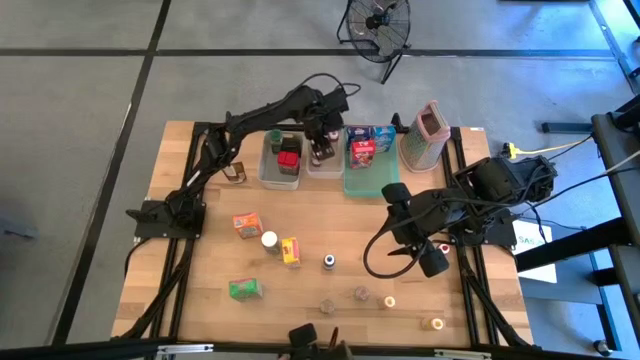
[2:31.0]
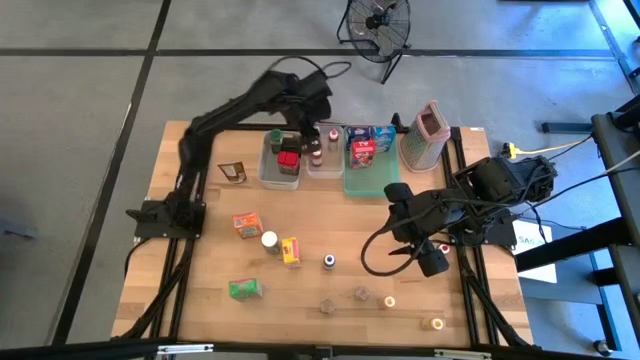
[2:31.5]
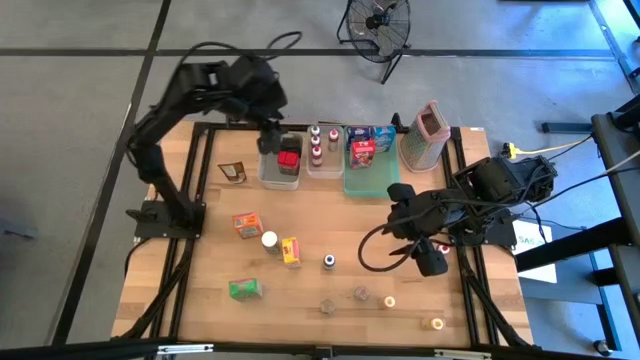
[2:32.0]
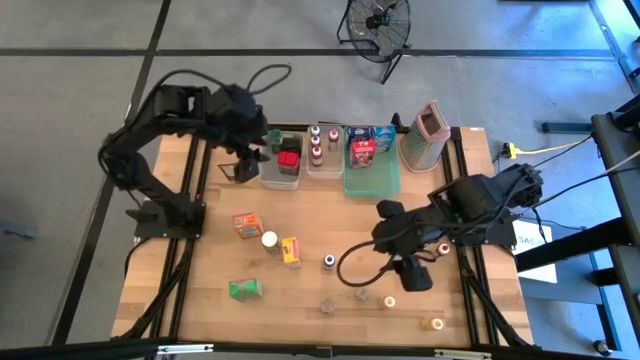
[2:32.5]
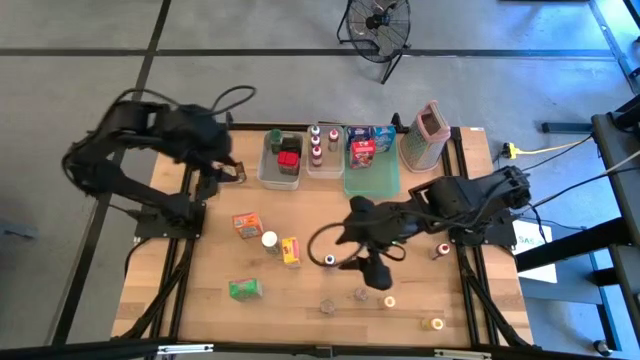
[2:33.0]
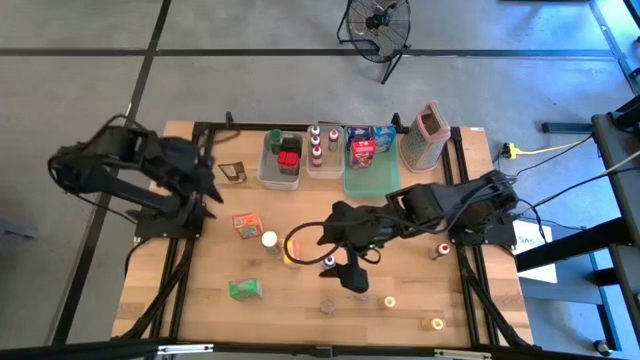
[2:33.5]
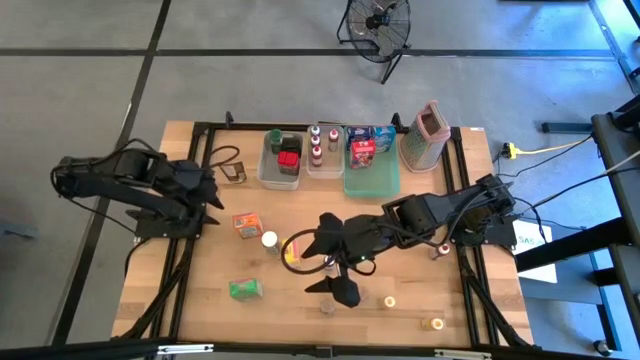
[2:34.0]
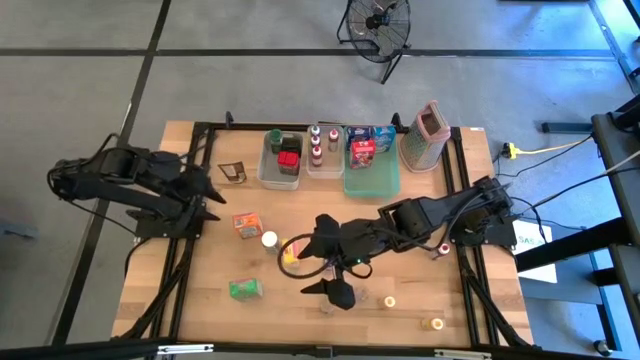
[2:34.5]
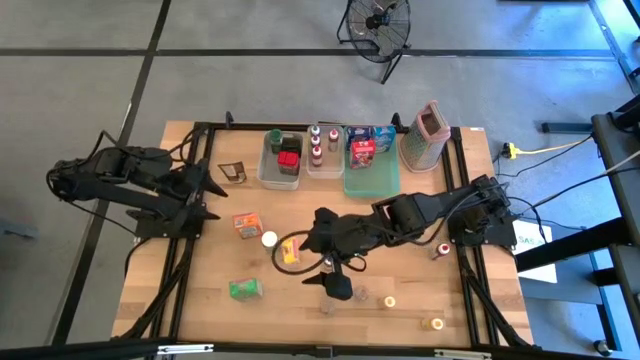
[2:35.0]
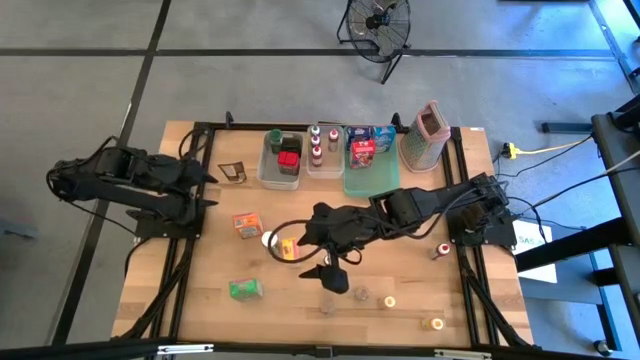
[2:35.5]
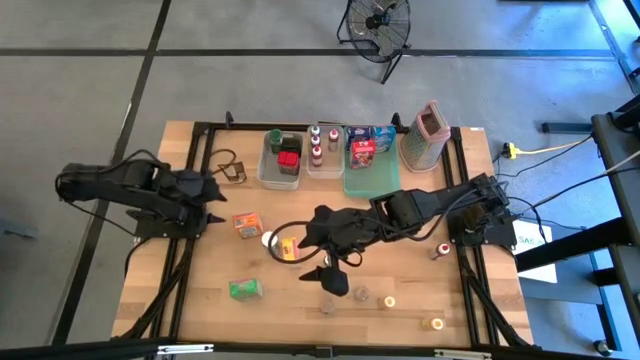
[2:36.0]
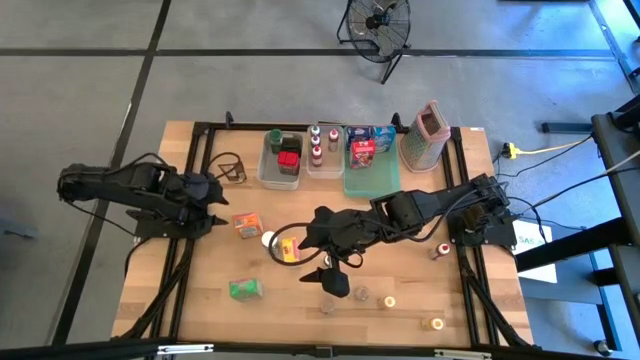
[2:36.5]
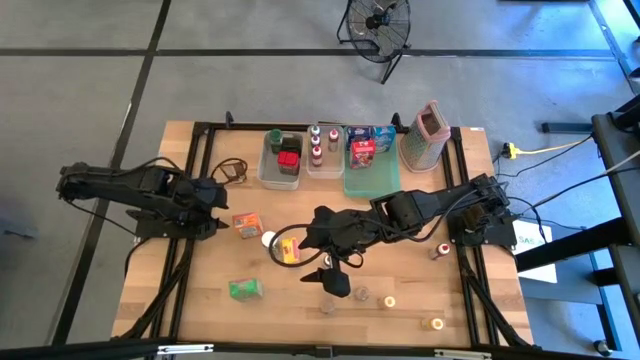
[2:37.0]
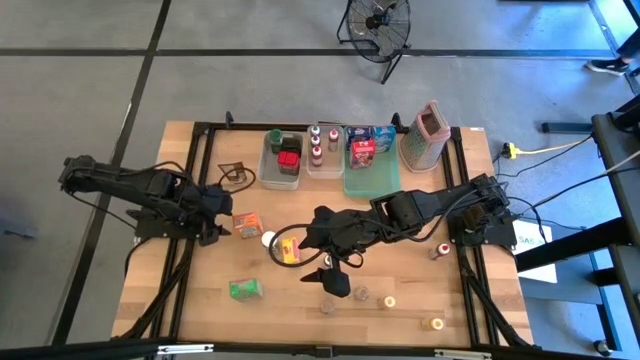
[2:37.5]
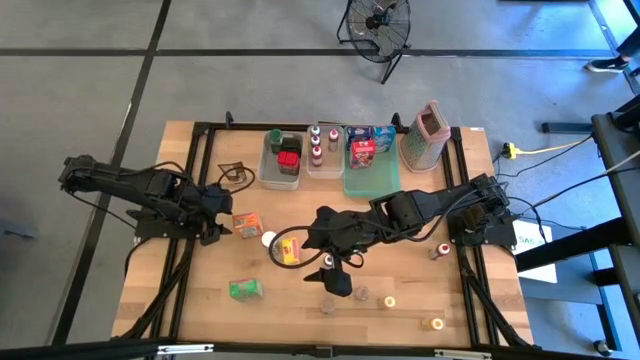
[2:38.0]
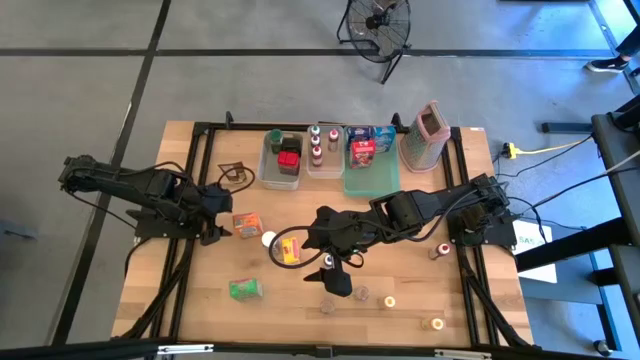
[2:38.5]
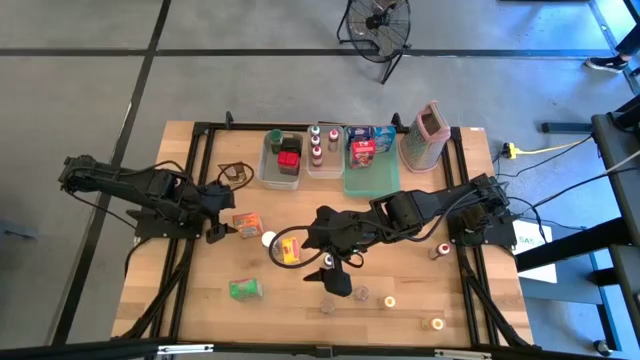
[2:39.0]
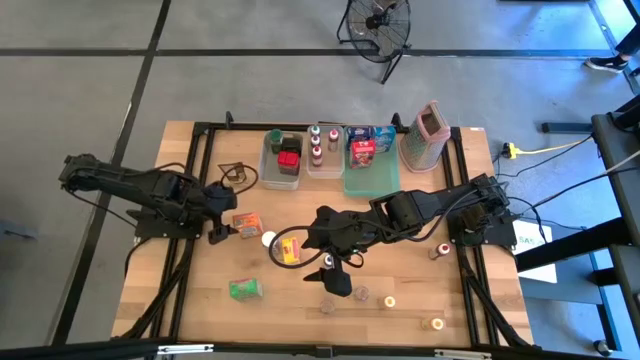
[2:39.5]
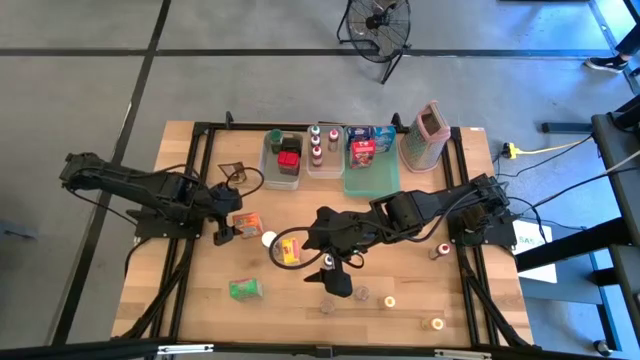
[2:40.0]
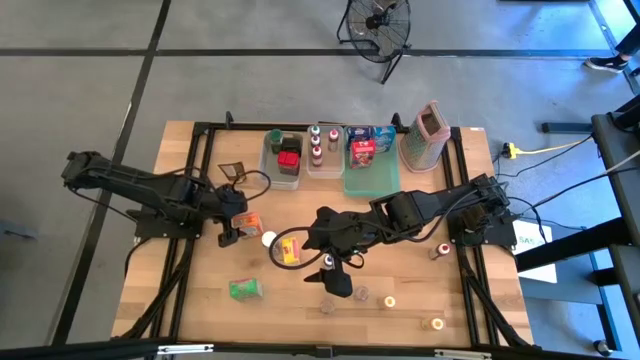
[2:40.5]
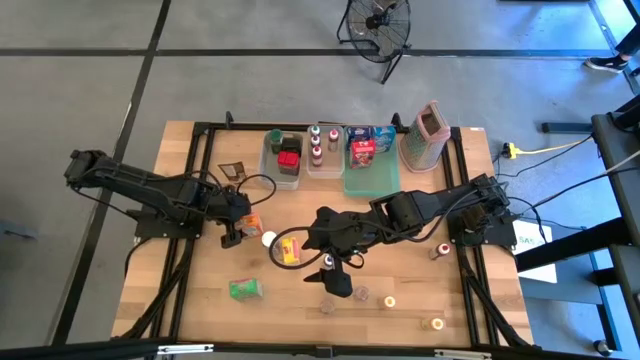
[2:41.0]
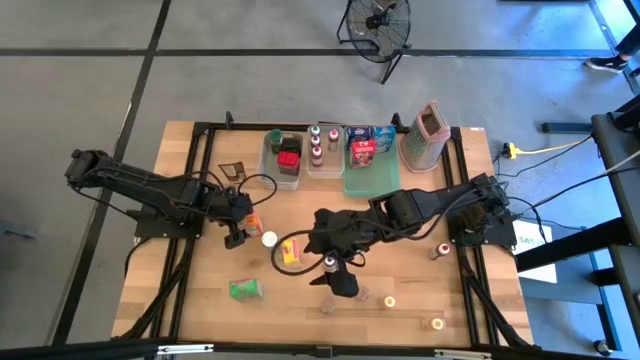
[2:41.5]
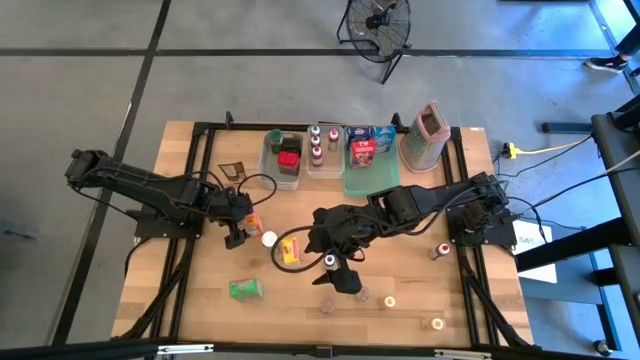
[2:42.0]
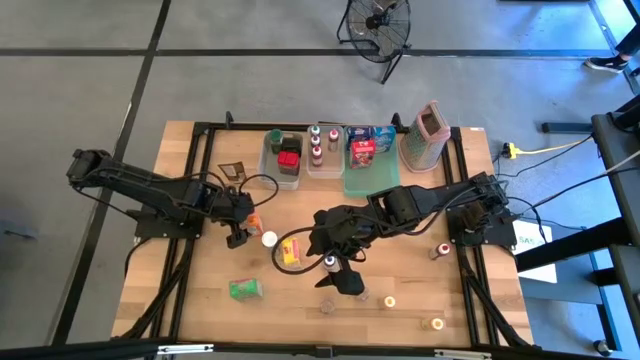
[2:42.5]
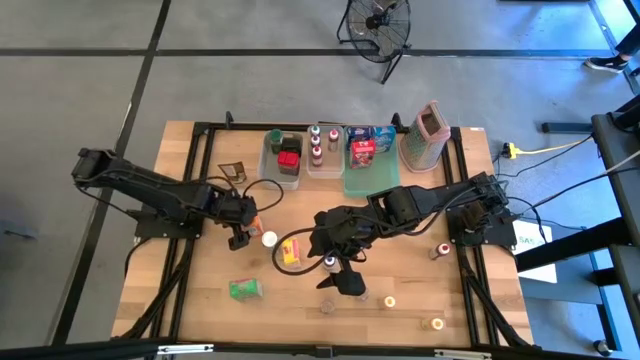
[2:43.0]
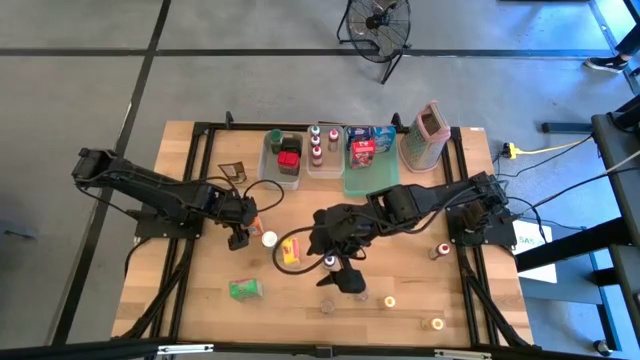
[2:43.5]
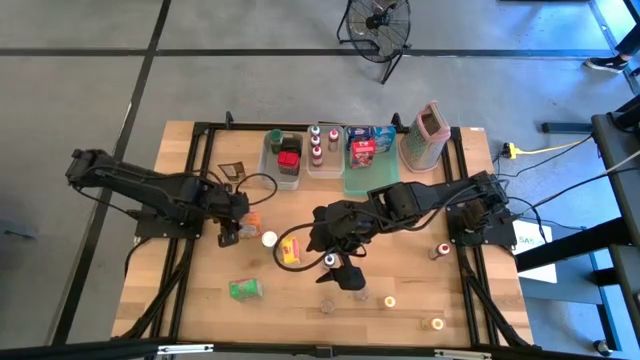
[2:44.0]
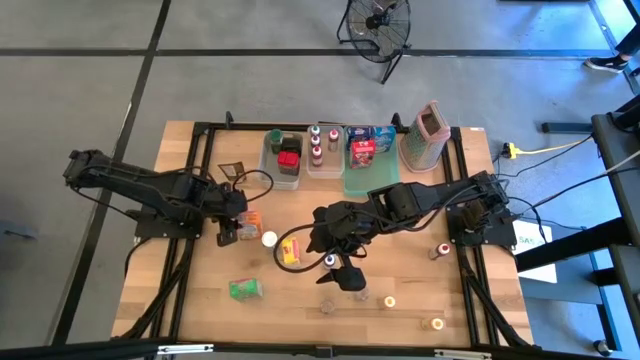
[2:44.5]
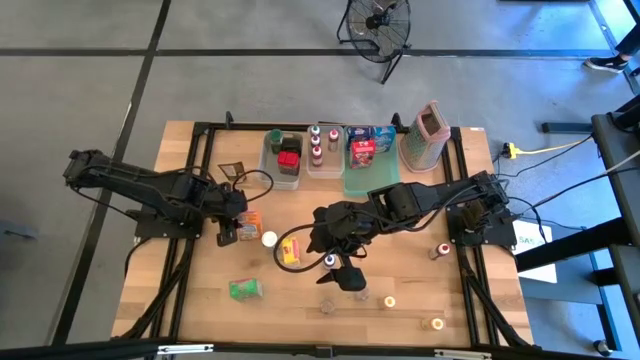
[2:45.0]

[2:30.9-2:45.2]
Task: Pick & Place Kitchen Items
Put the orange cereal box into the green bin

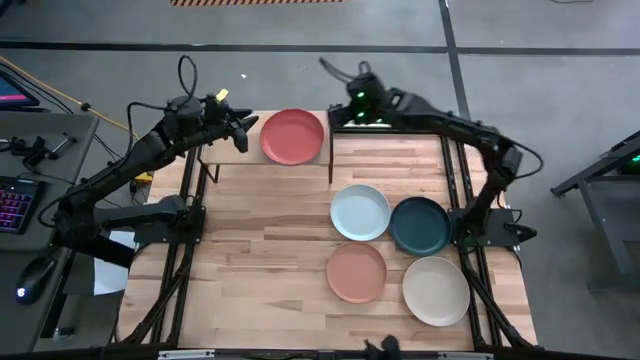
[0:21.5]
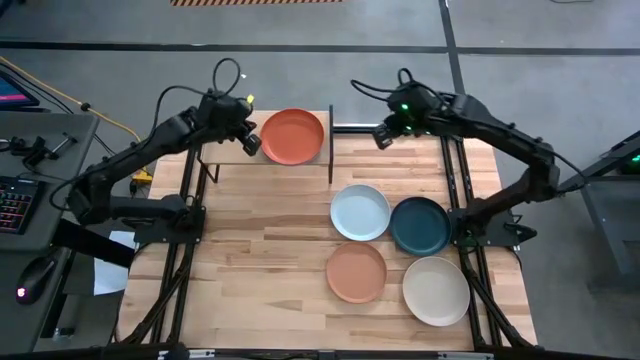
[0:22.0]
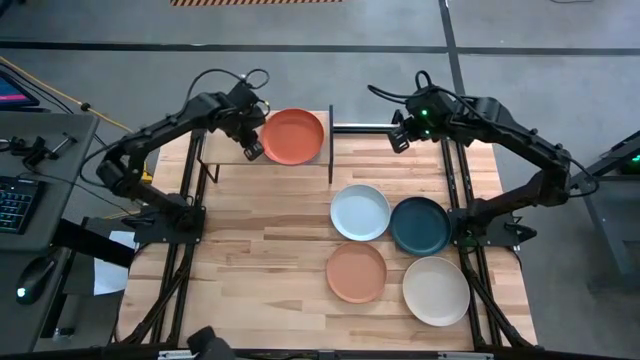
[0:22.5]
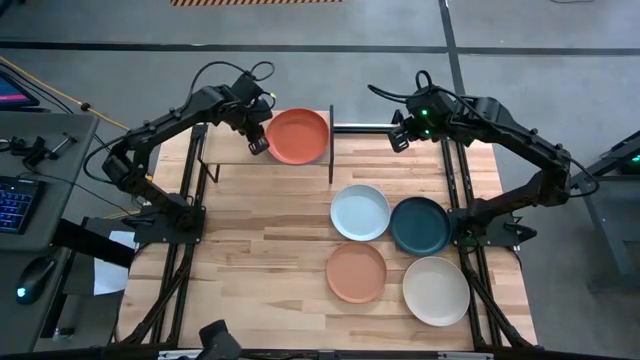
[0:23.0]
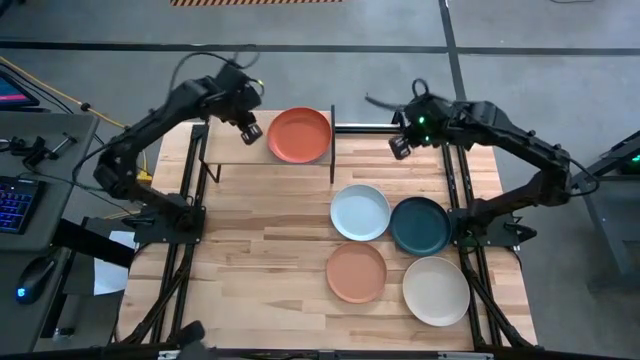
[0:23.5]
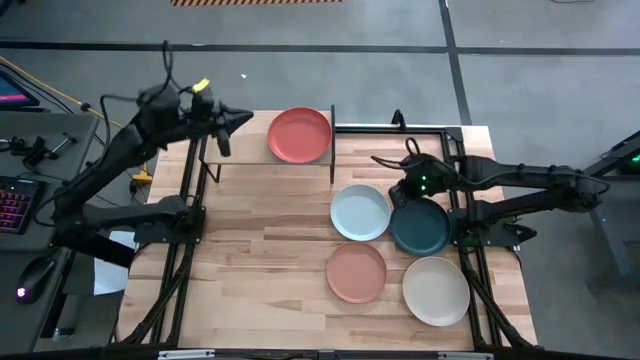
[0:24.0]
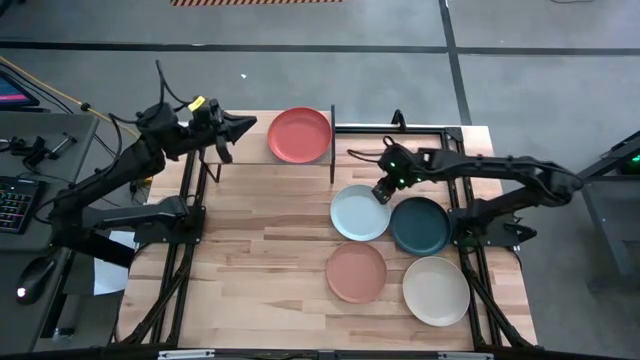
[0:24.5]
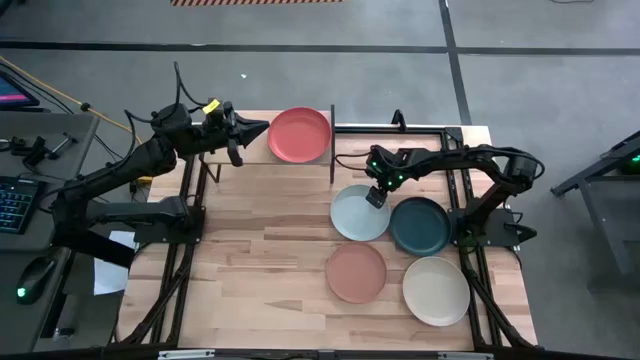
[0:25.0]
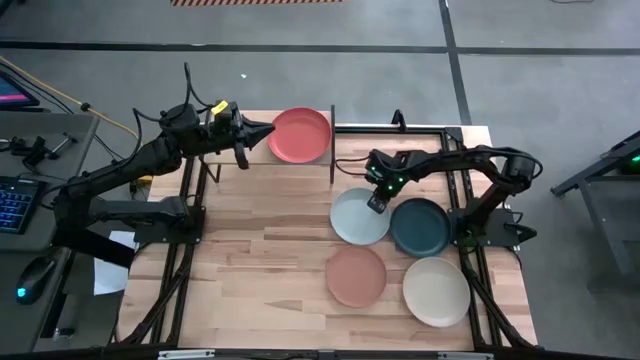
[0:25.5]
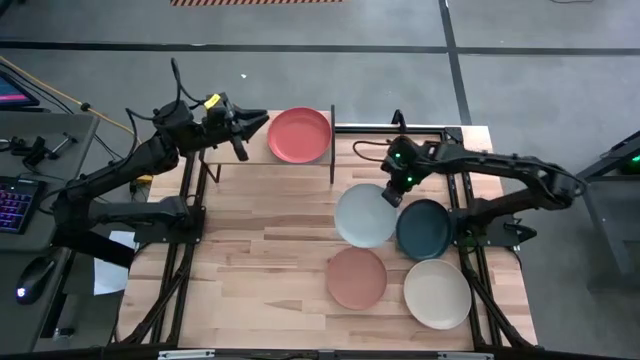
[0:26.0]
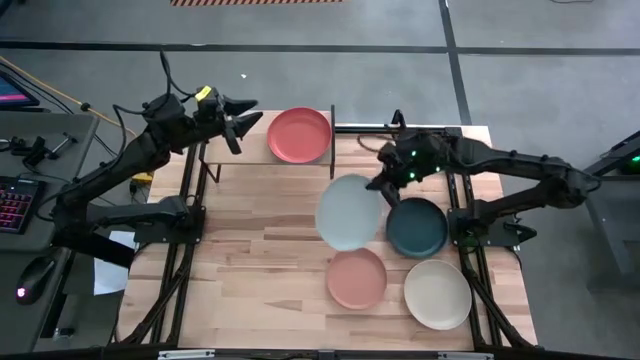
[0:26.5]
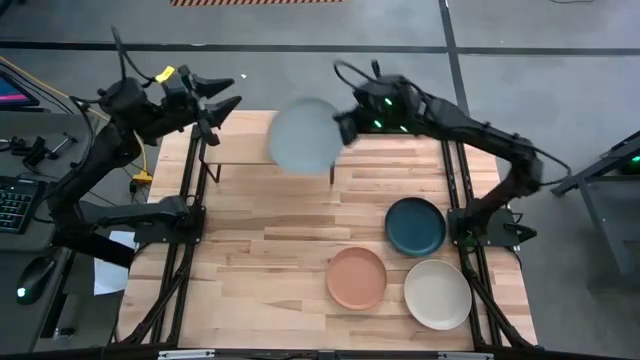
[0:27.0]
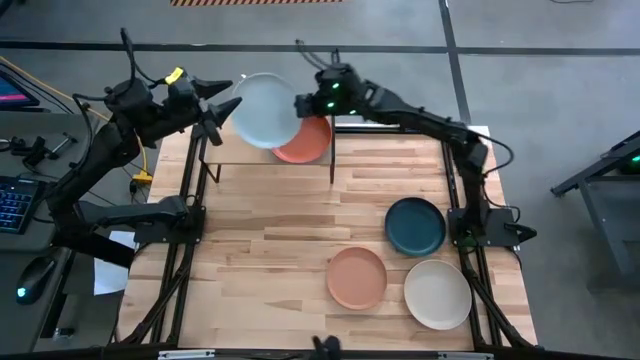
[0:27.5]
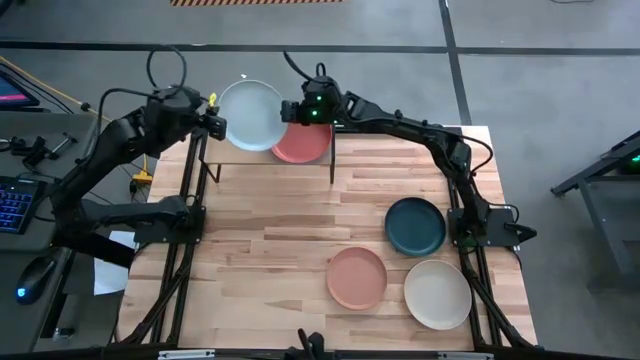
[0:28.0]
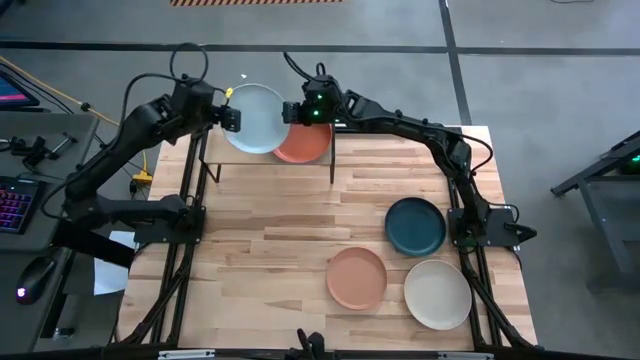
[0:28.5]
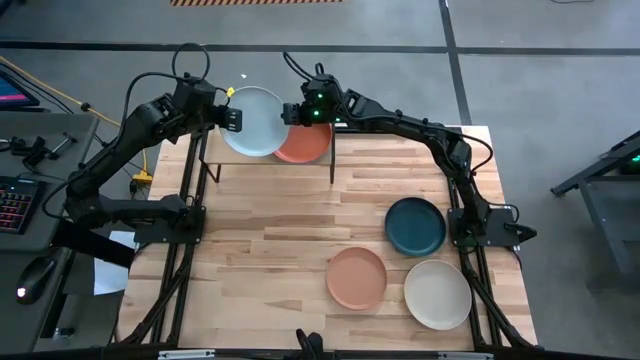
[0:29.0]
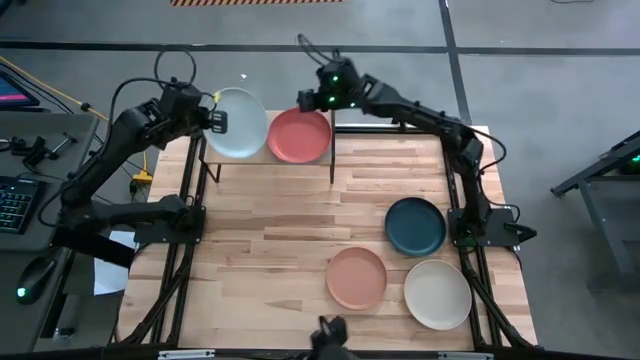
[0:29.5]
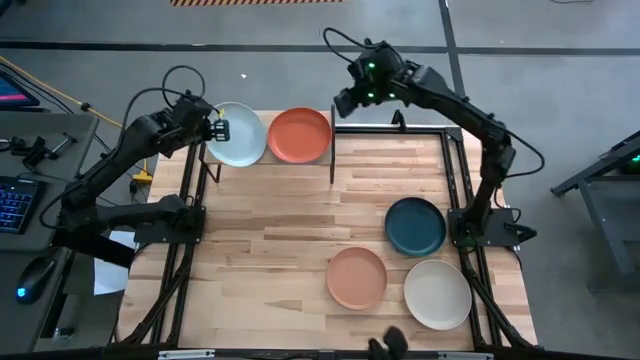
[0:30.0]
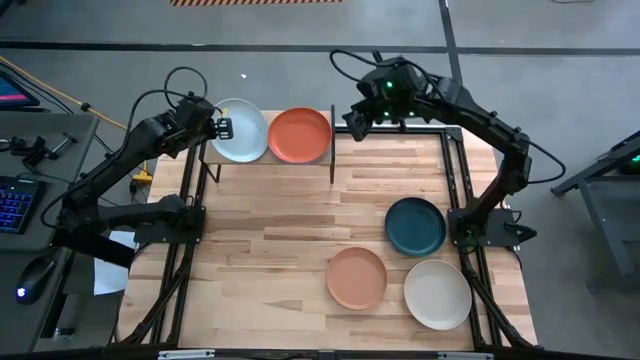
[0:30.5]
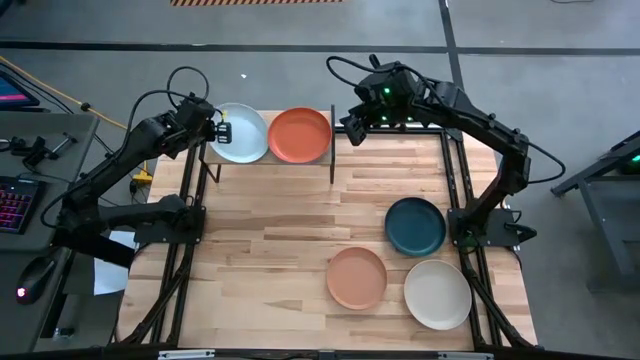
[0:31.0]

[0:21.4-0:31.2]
Task: Place and stack plates onto a shelf
Put the gray plate on the shelf
